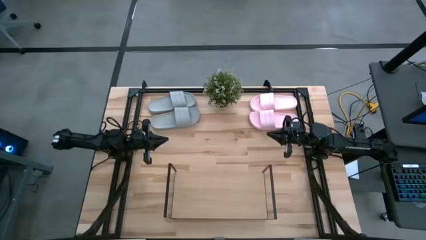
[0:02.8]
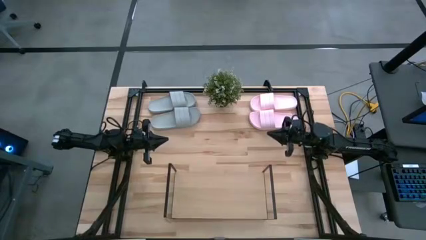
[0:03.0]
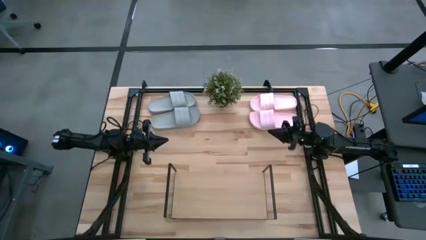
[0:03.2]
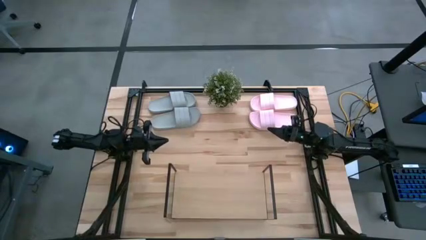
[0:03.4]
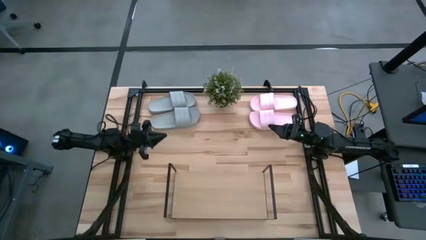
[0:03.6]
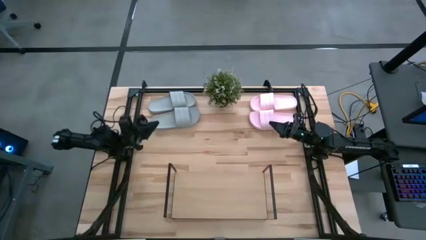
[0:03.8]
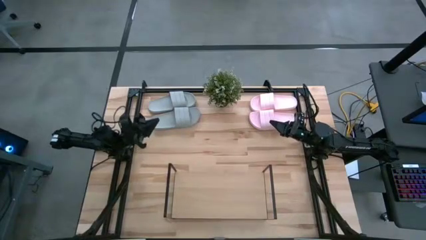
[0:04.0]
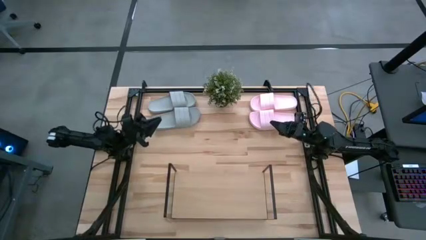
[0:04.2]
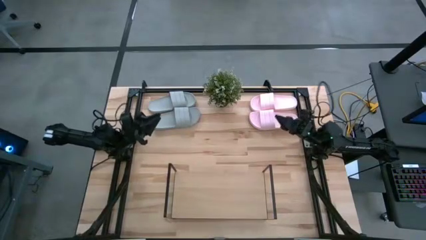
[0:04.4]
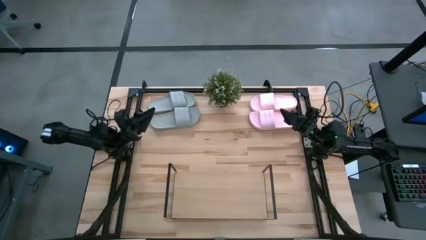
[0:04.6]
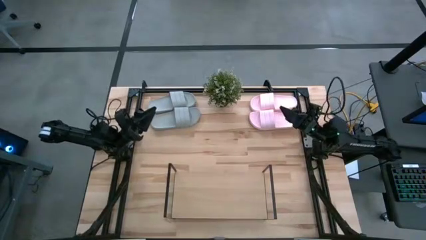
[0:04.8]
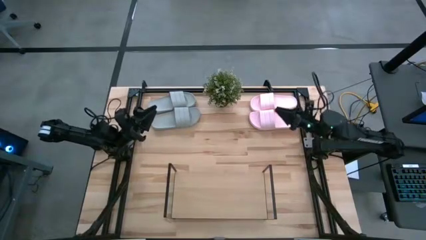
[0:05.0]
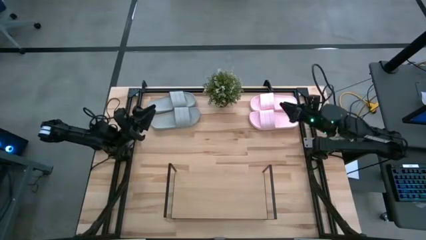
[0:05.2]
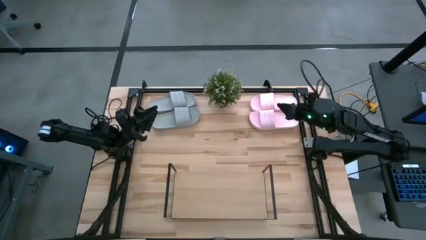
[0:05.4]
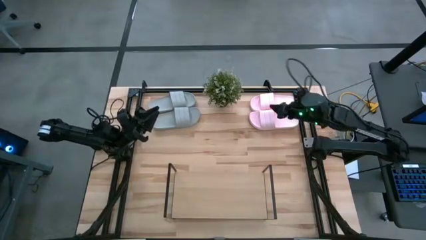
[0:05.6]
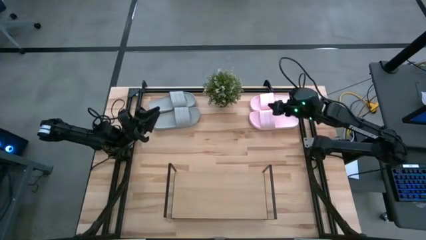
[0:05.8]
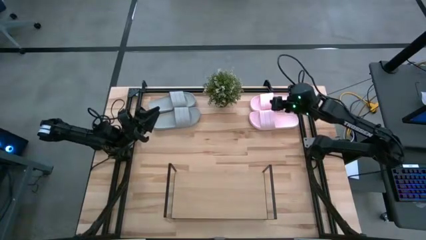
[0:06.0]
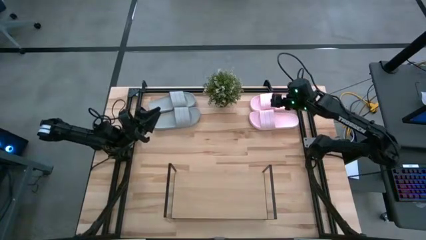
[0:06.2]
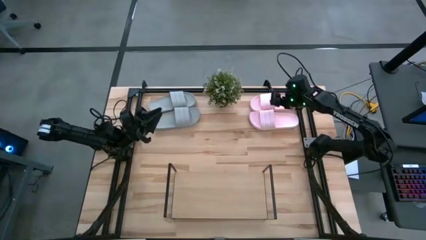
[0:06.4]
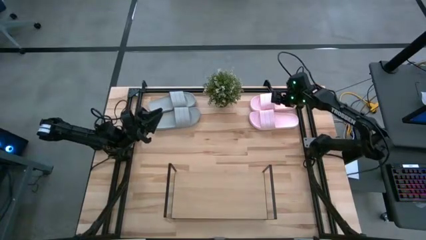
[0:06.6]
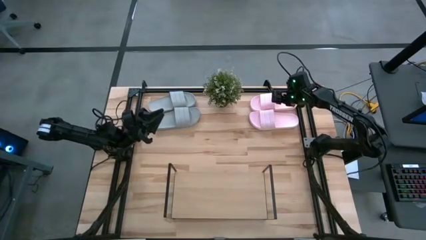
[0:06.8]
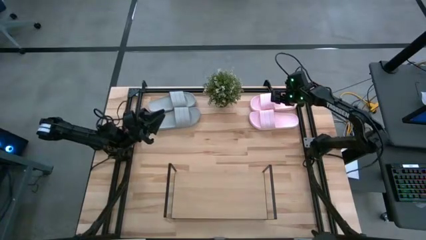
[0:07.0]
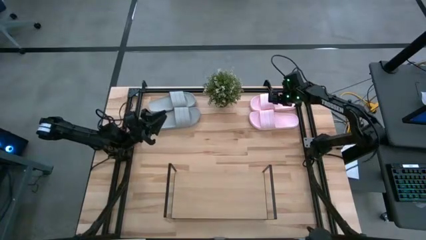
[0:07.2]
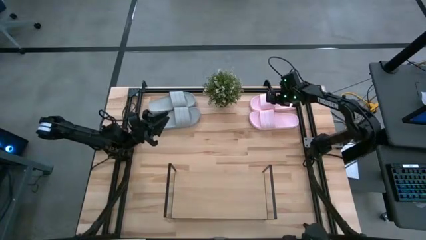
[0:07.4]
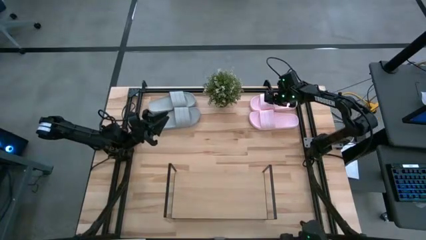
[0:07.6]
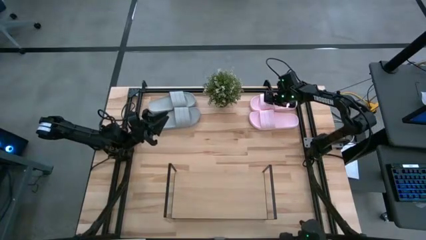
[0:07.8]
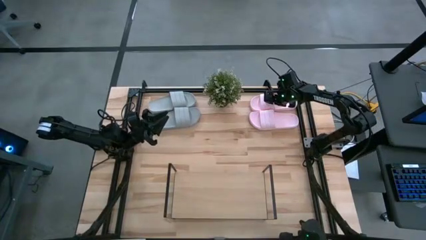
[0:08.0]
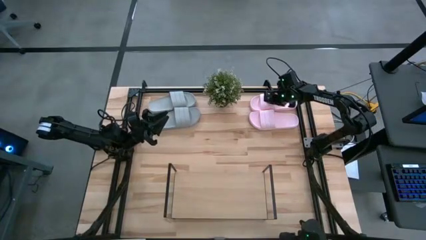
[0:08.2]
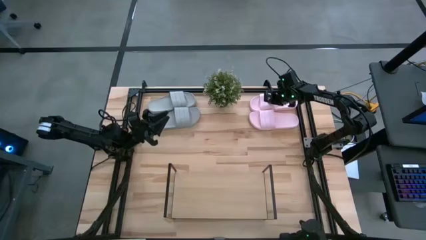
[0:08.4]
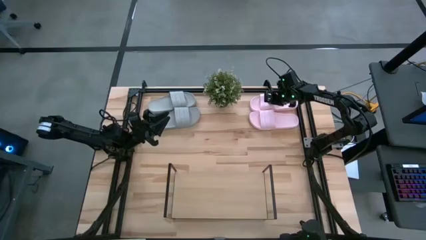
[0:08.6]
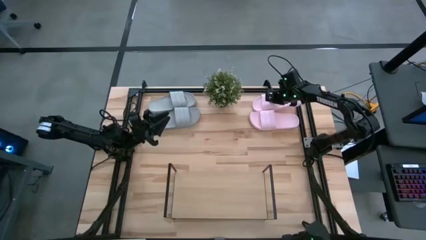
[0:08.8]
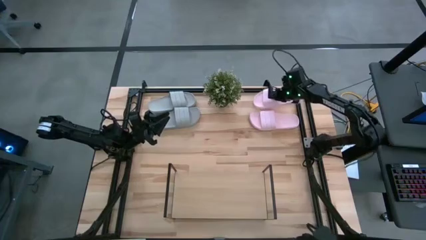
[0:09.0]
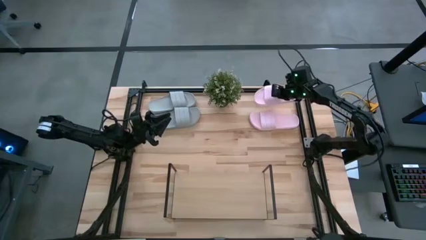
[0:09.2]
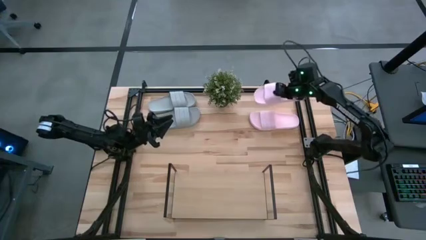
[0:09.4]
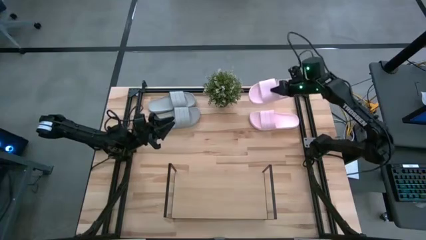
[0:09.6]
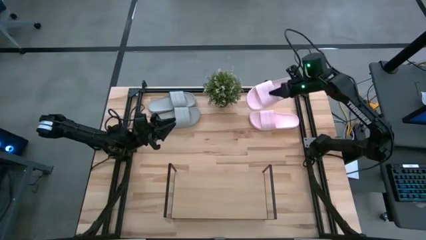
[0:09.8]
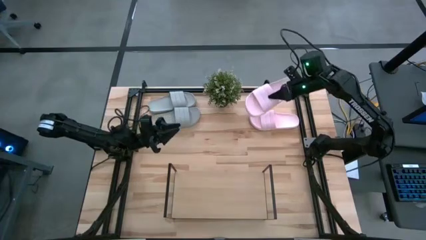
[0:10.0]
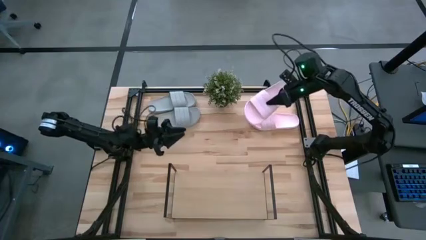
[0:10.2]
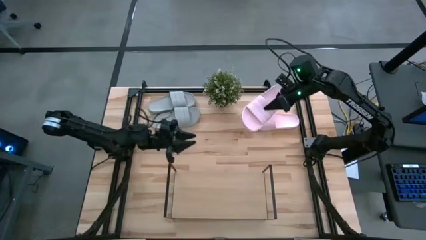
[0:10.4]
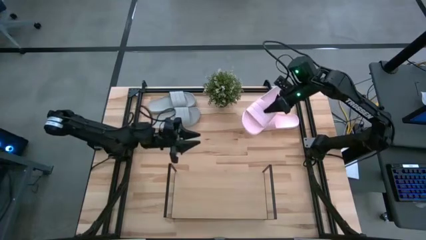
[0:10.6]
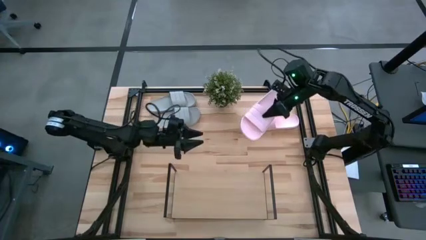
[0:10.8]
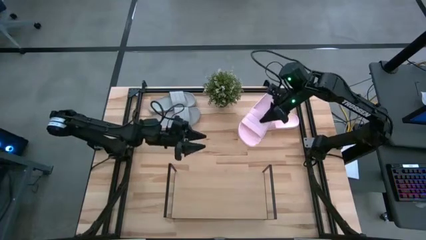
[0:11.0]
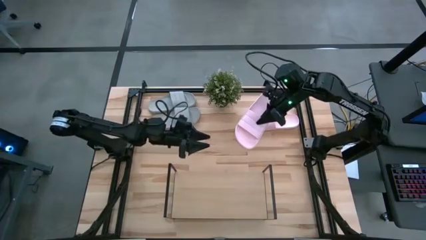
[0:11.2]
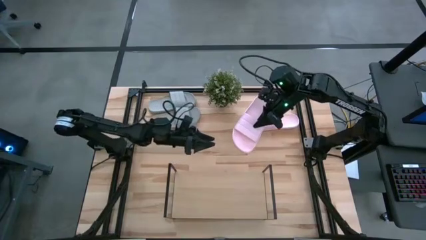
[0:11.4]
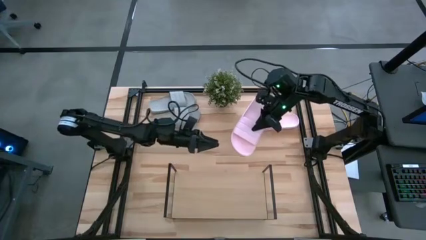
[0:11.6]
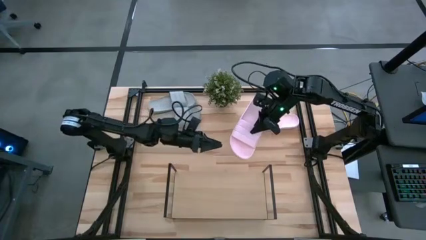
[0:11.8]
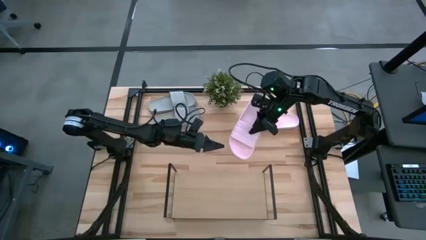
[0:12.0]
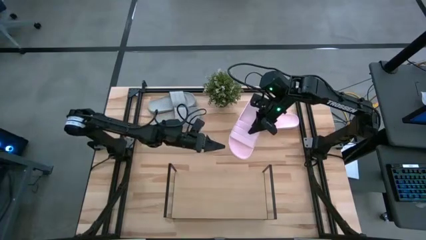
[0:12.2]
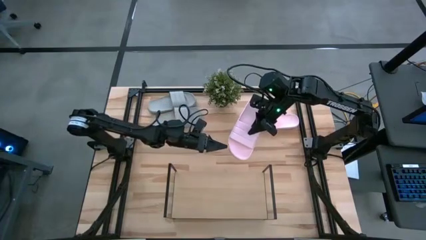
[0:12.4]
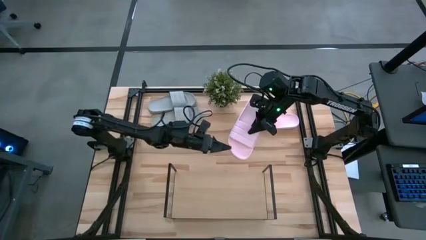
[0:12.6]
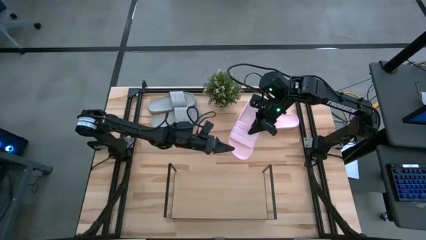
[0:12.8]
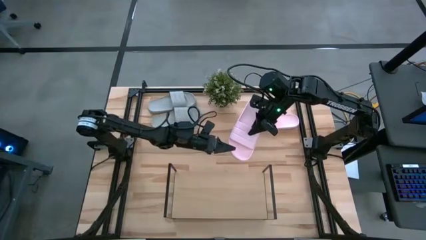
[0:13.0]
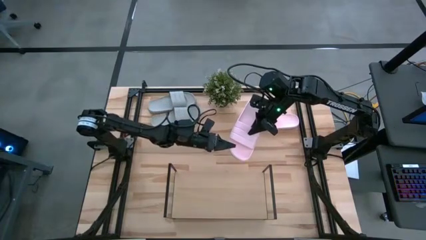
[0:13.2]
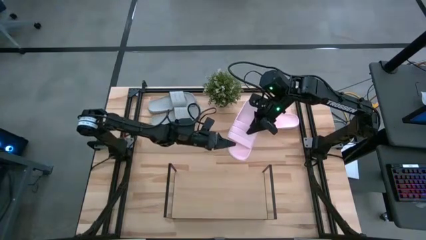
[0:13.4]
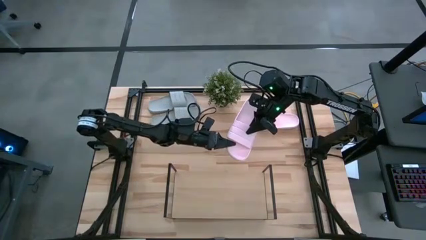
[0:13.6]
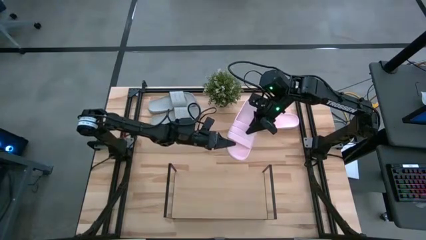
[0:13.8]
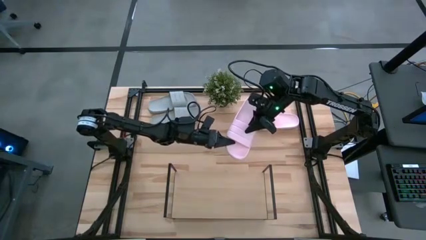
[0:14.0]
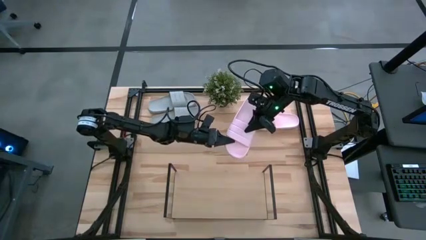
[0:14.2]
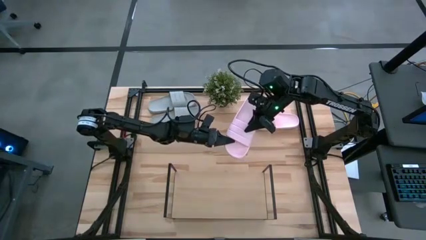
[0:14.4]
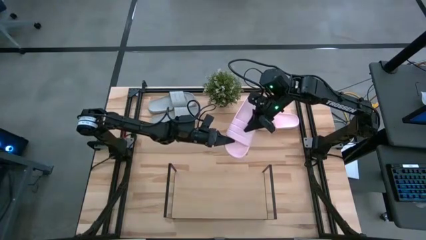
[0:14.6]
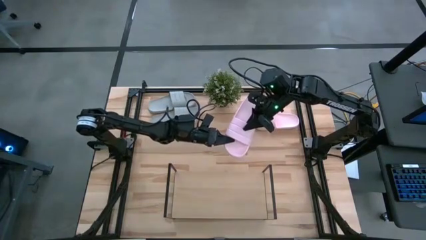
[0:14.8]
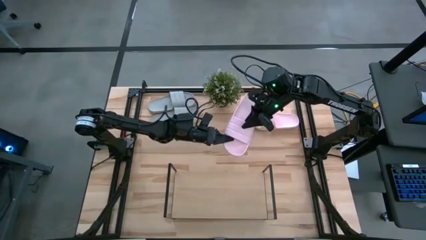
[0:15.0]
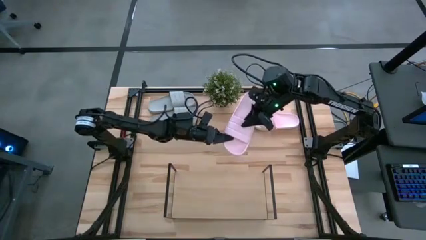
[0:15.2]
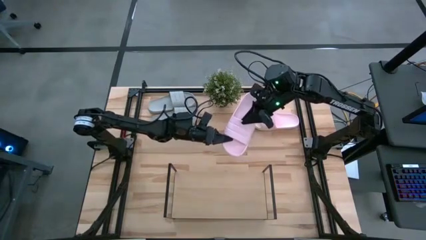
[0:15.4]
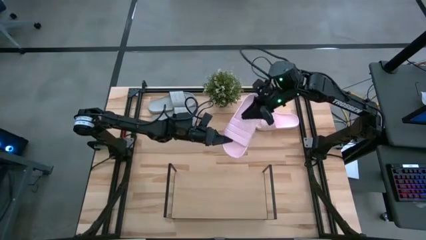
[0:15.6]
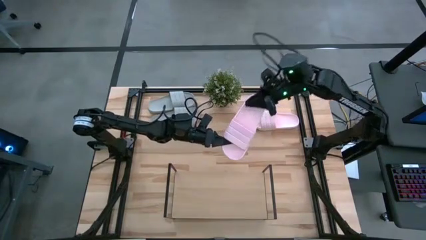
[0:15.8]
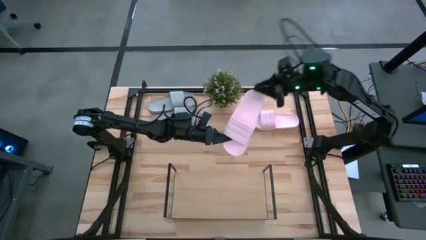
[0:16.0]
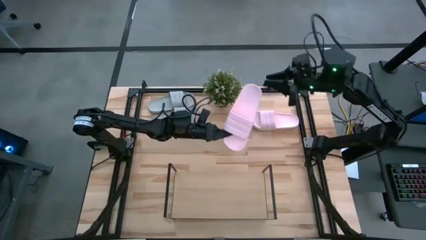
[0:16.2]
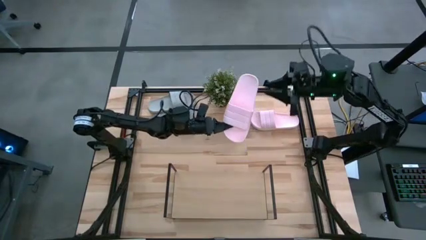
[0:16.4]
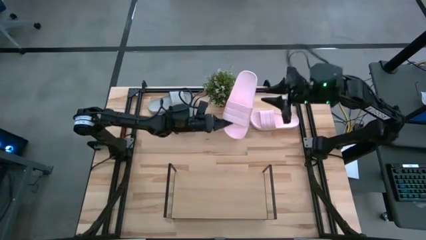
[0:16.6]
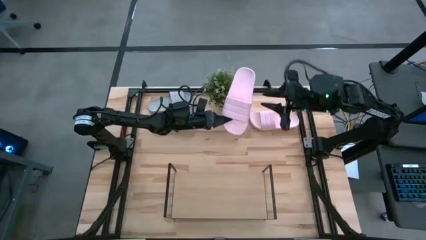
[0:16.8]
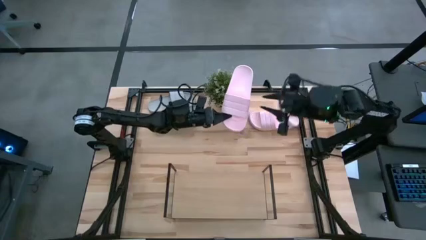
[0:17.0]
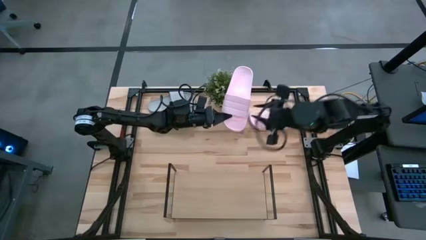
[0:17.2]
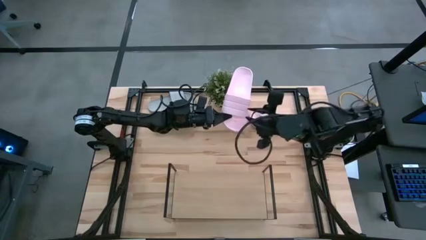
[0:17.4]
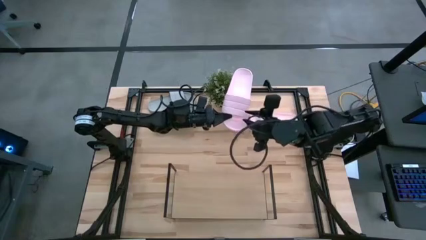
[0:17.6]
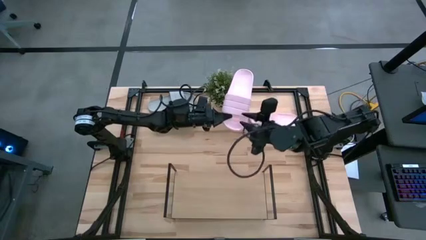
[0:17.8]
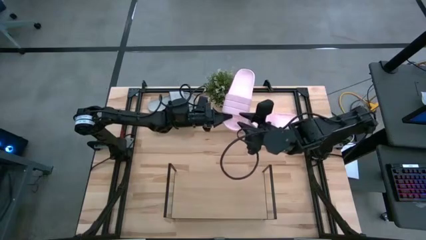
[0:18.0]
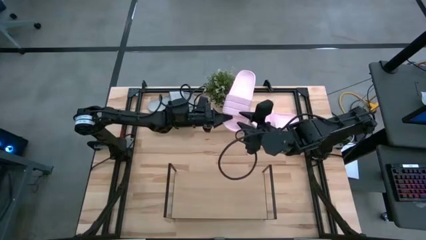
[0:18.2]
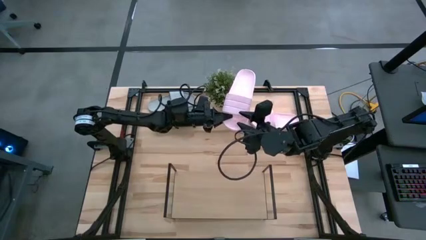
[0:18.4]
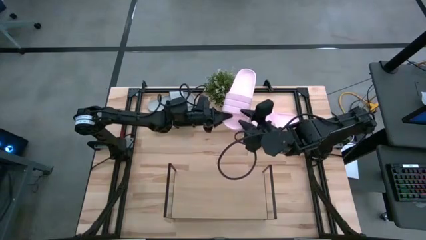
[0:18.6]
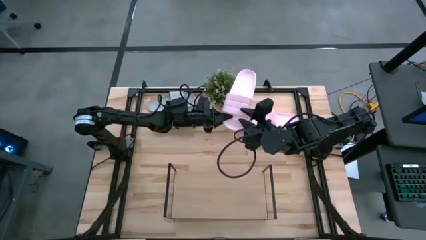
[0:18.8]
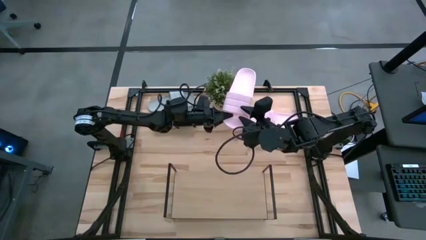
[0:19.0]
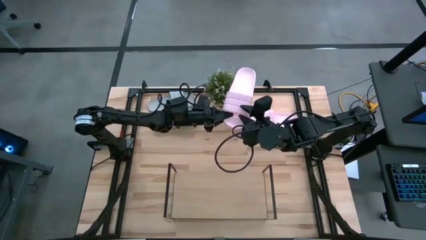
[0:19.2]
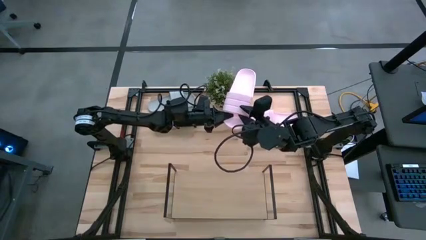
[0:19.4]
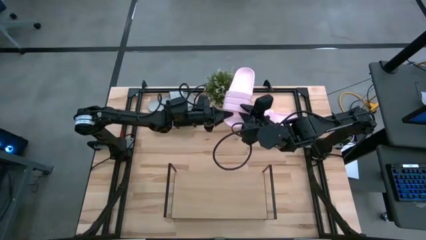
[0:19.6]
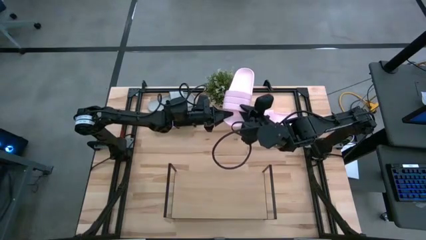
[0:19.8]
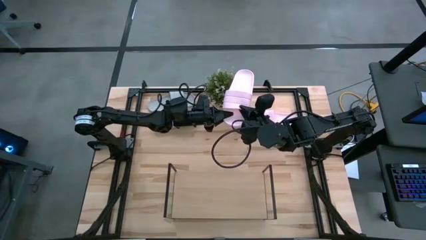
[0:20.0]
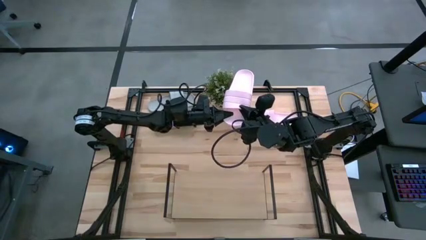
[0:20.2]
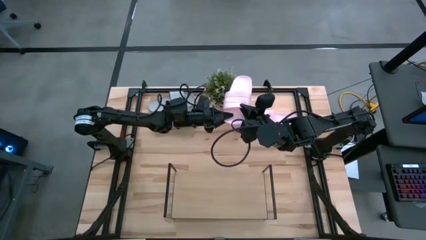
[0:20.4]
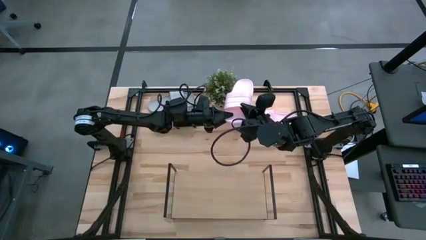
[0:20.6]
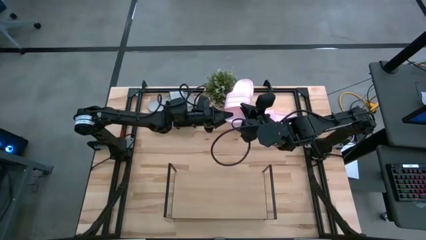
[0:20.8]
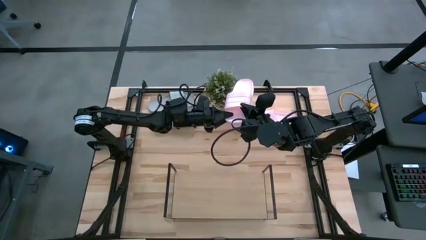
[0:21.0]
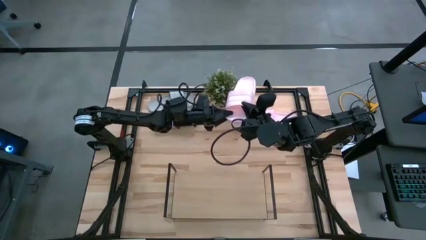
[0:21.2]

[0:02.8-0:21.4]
Task: Pick and place slides into the shelf
Put the top pink slide on the shelf
